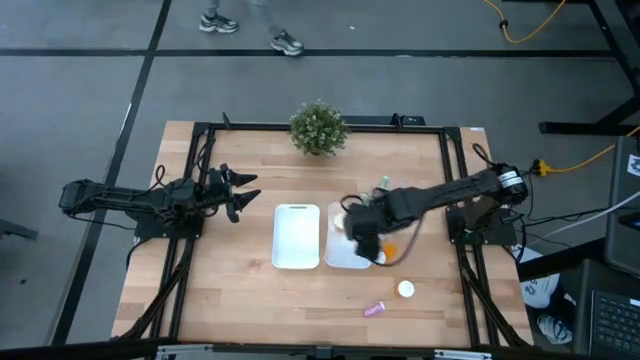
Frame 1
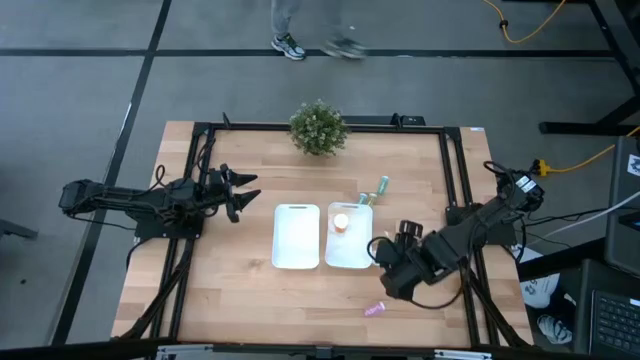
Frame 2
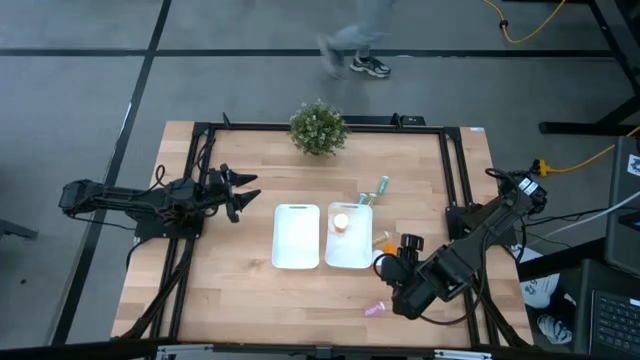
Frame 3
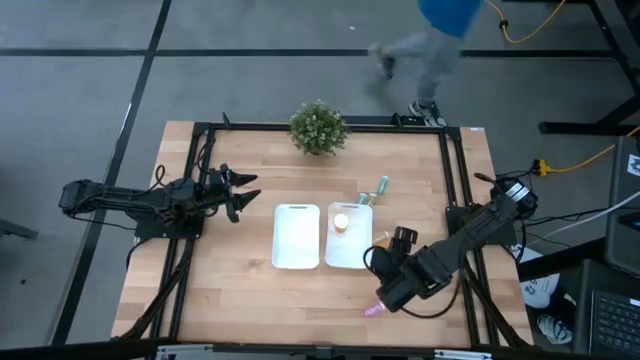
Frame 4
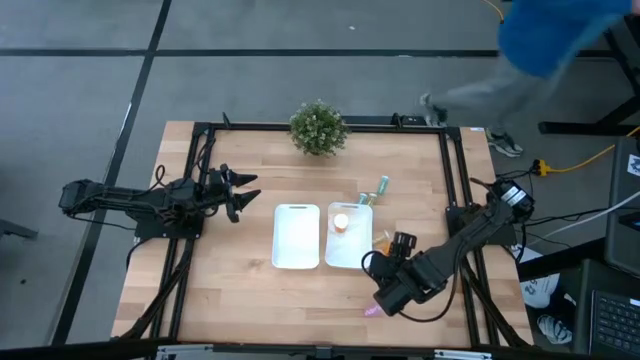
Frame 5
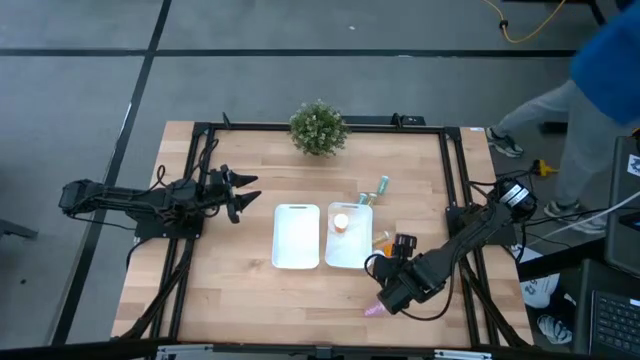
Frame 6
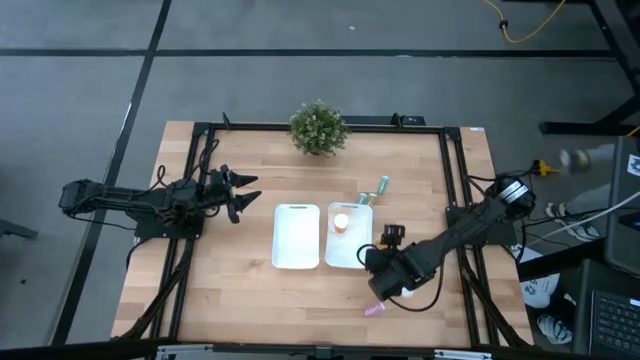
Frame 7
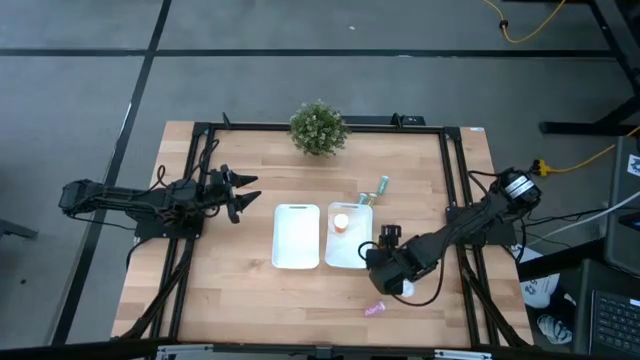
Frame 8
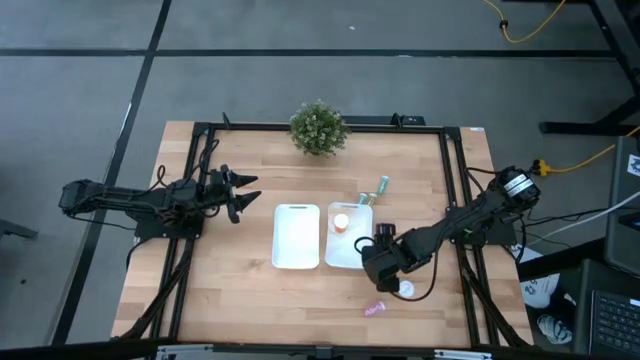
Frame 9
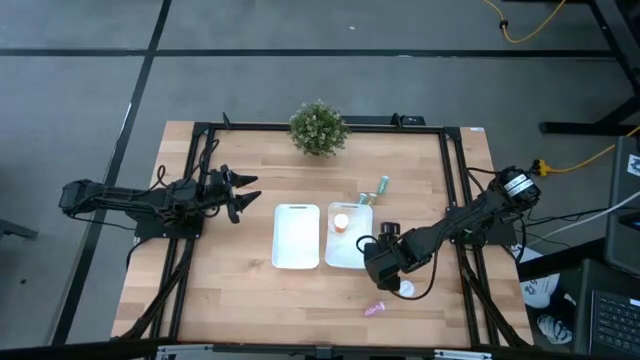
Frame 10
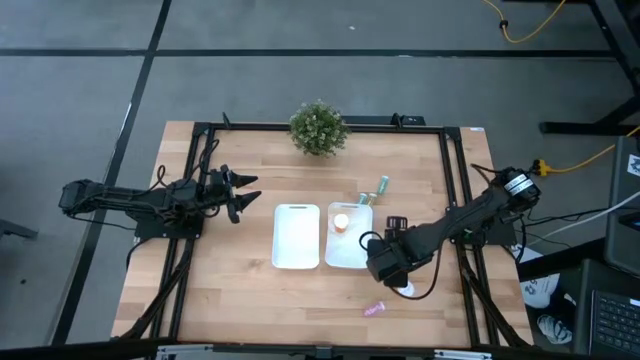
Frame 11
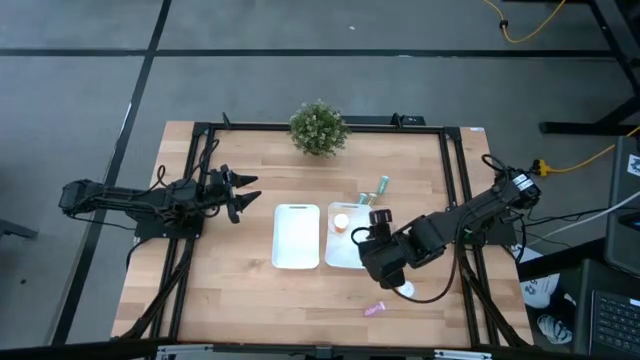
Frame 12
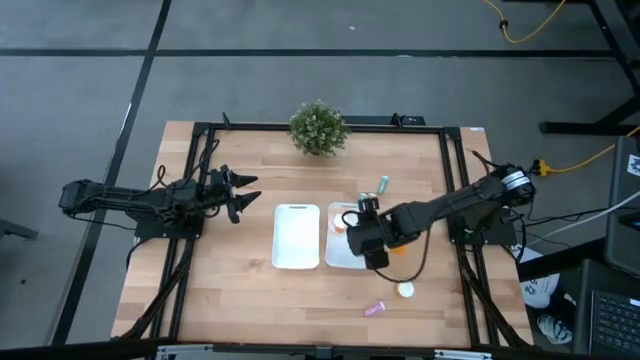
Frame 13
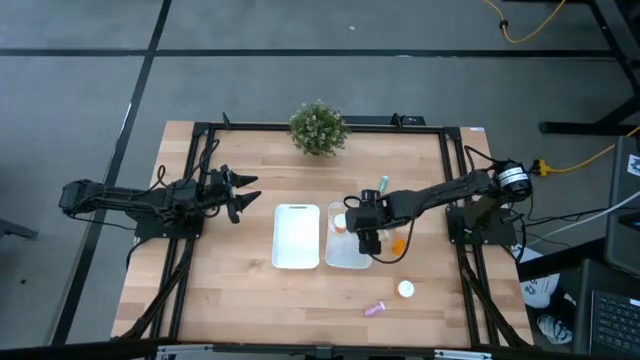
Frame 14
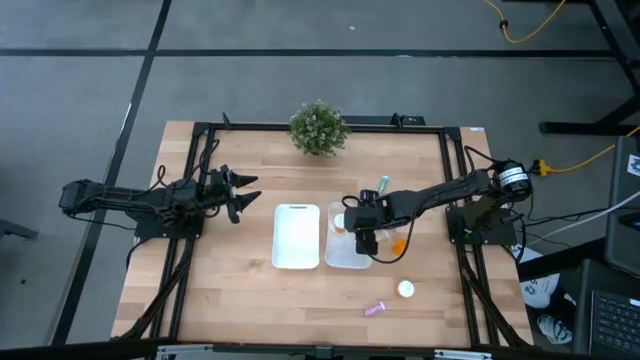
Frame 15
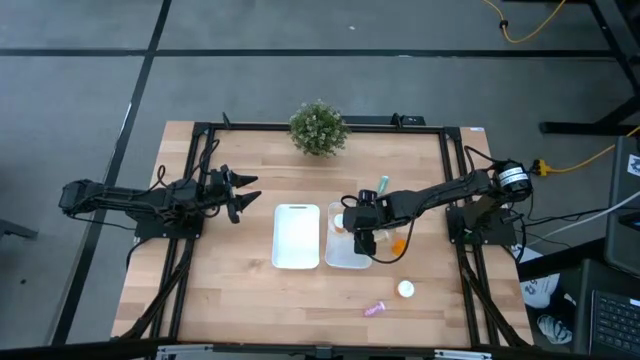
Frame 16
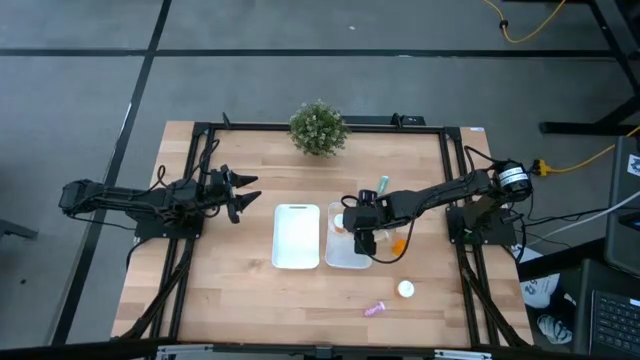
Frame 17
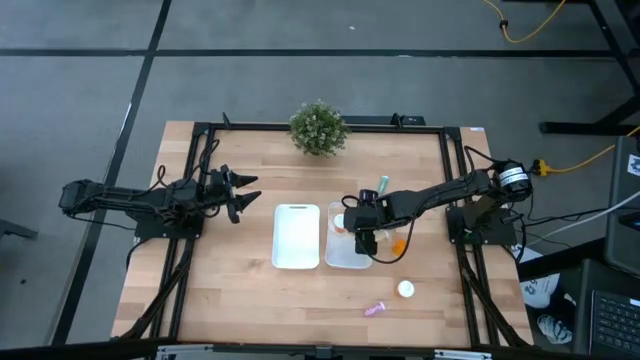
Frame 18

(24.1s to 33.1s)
Task: Pick and place medicine bottles into bin by pill shape (circle, oval)
Put the orange capsule bottle into the right white bin

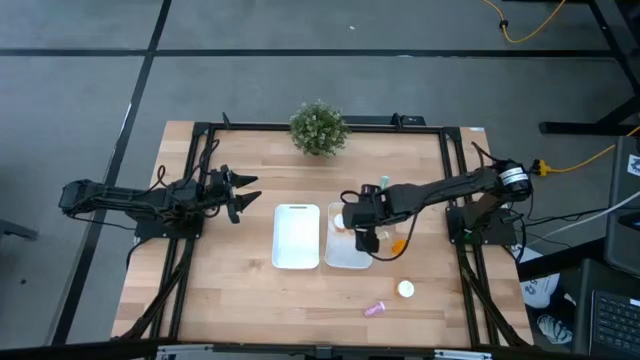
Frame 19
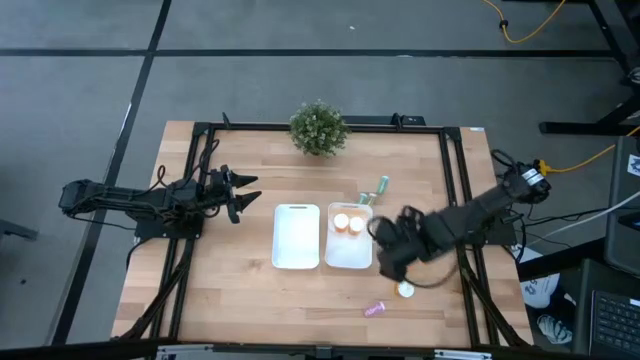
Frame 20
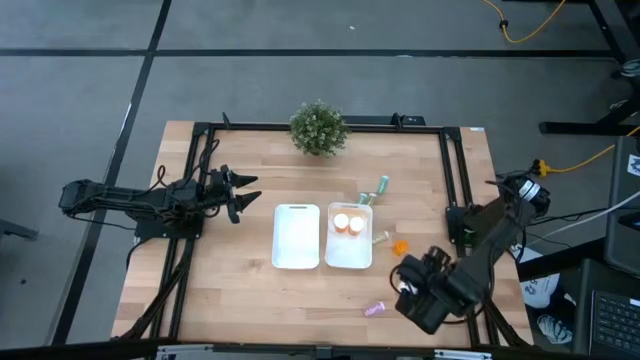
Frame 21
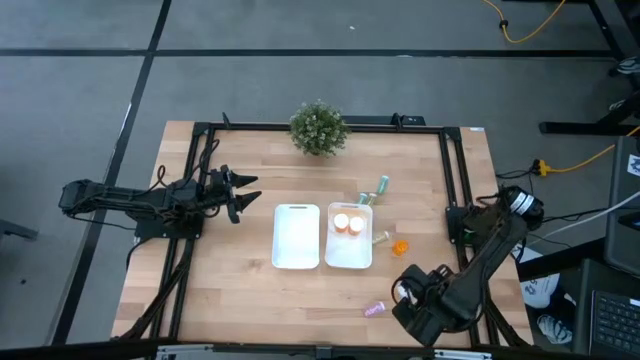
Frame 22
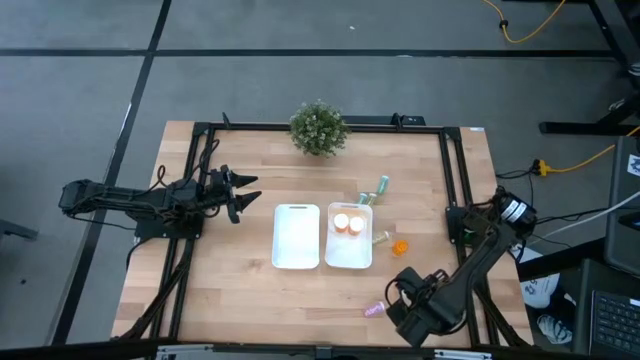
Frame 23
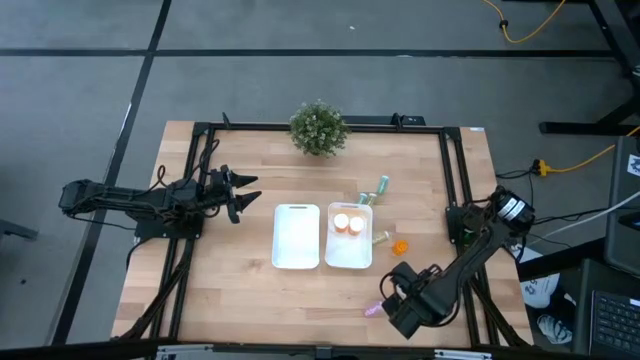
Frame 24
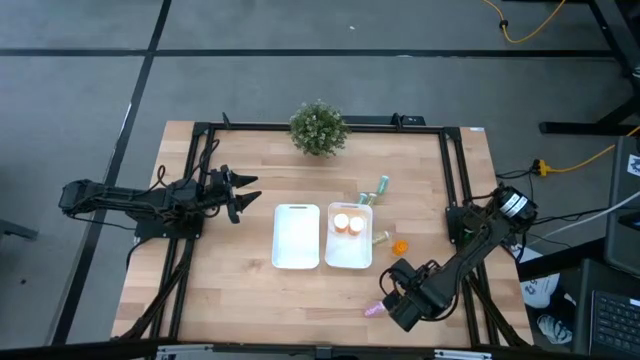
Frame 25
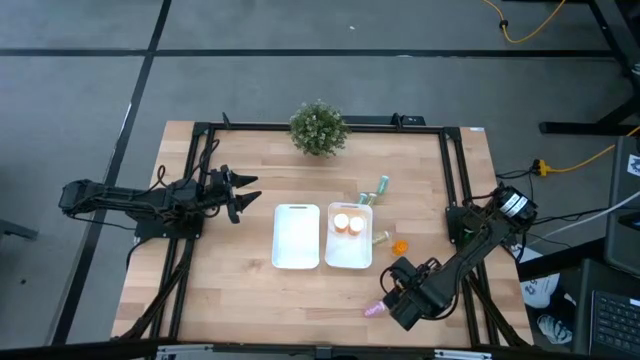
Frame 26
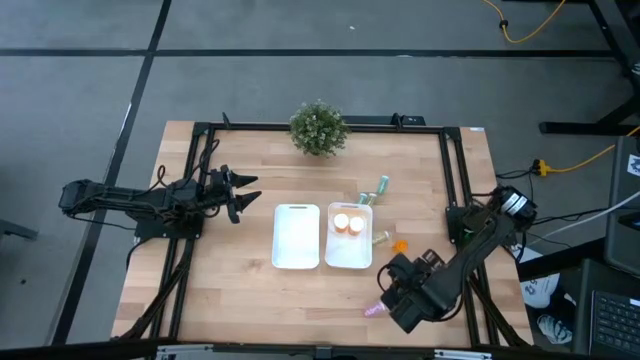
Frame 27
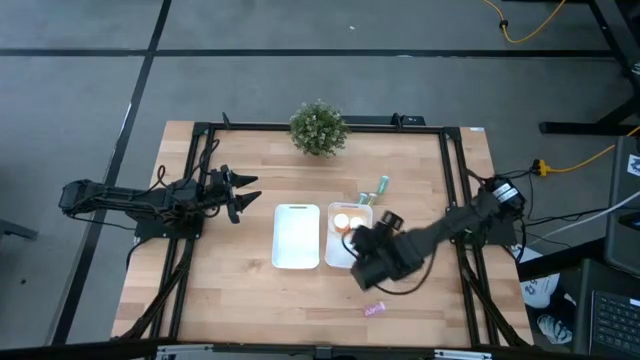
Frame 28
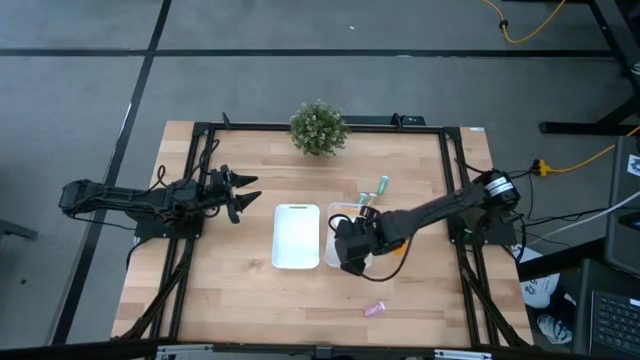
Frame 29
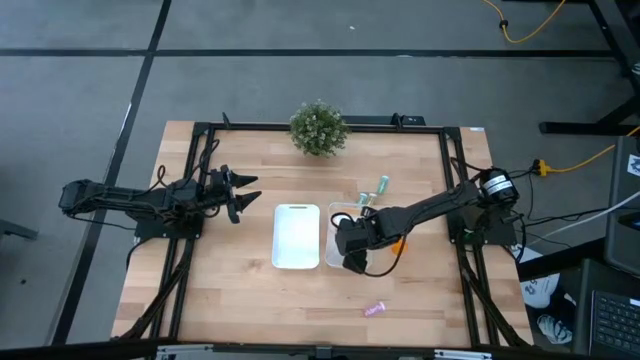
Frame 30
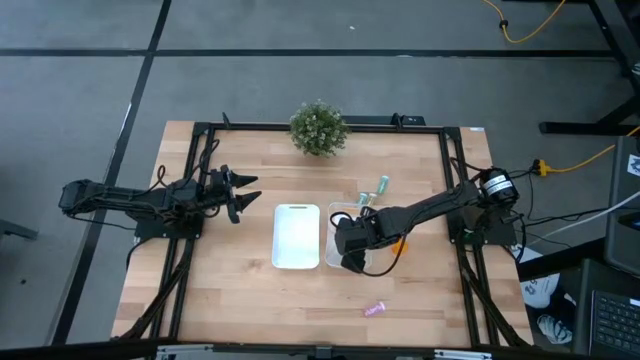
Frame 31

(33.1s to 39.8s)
Put the orange capsule bottle into the right white bin

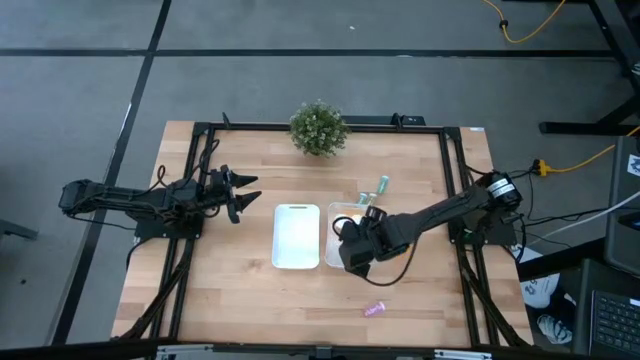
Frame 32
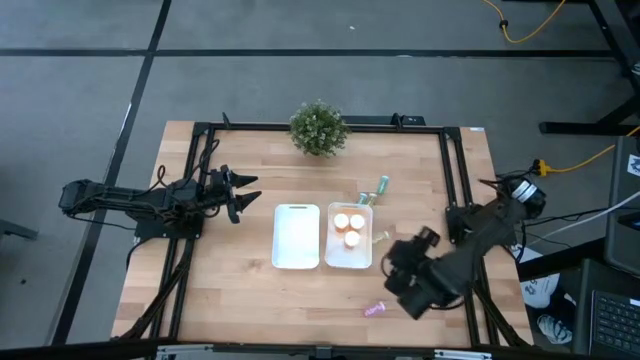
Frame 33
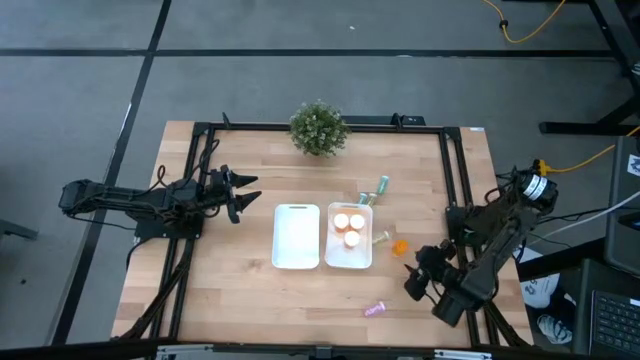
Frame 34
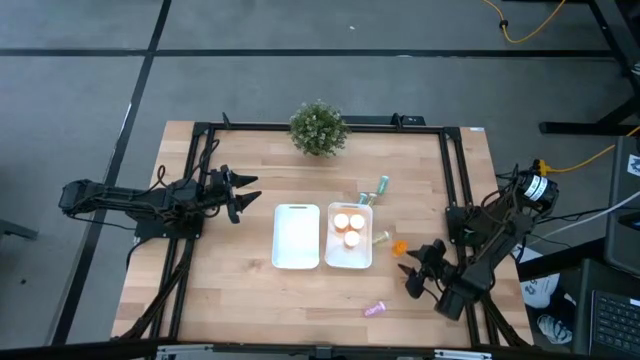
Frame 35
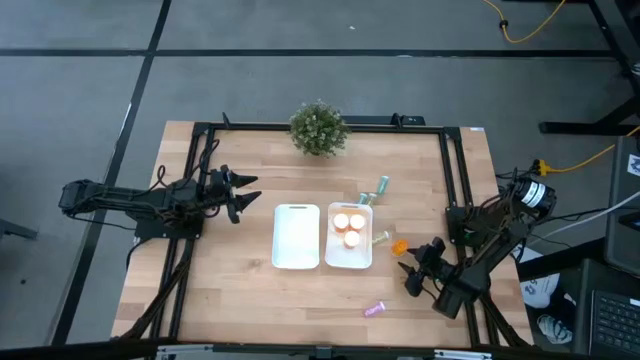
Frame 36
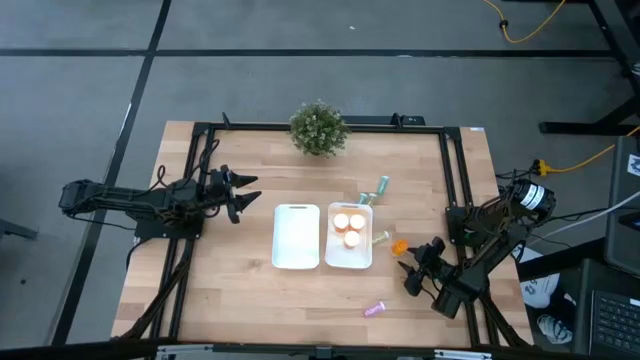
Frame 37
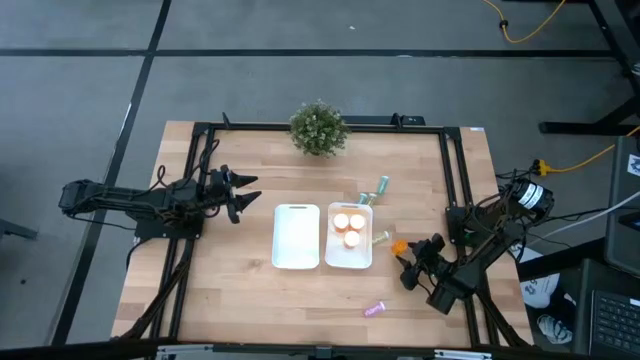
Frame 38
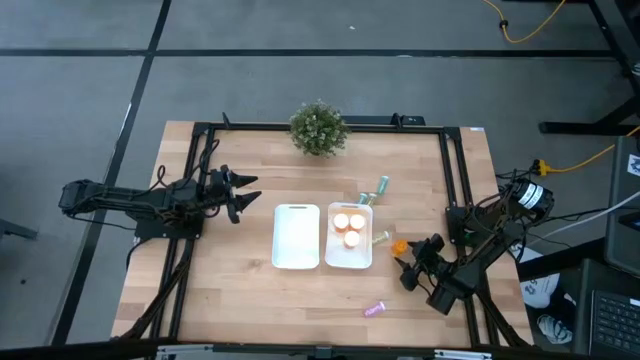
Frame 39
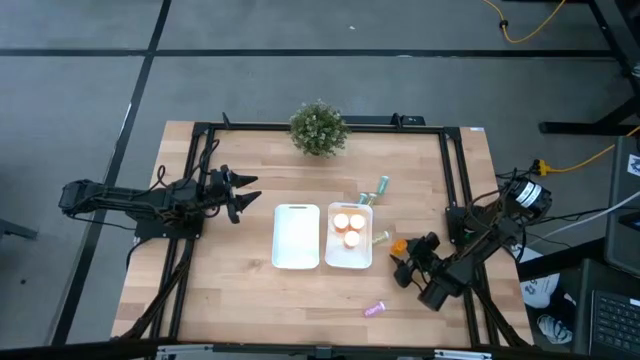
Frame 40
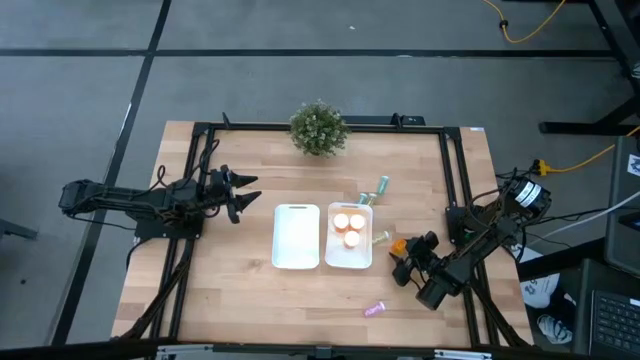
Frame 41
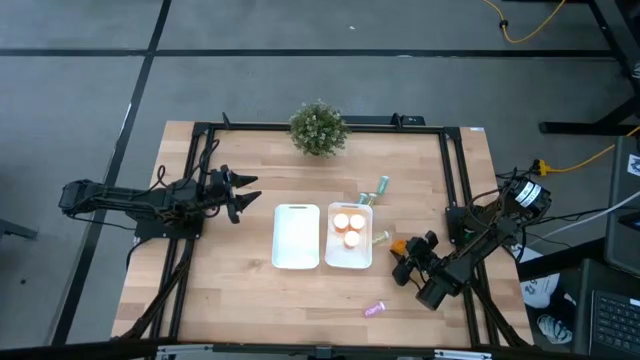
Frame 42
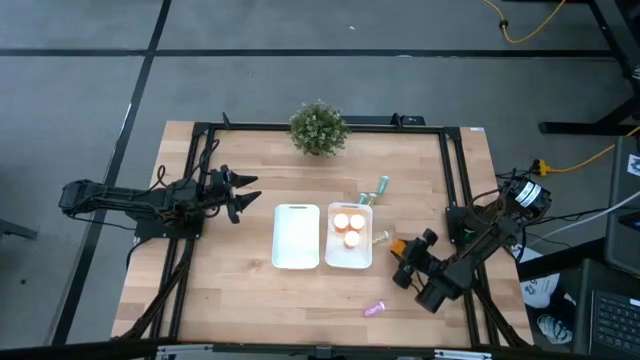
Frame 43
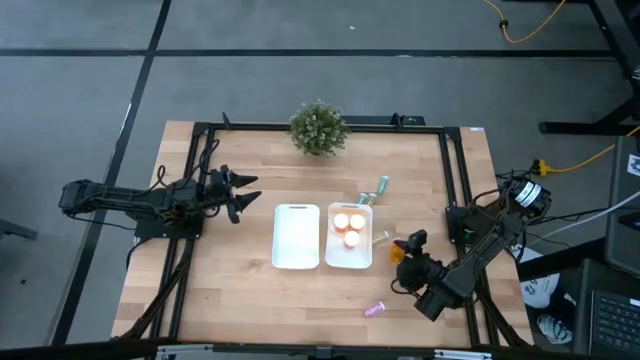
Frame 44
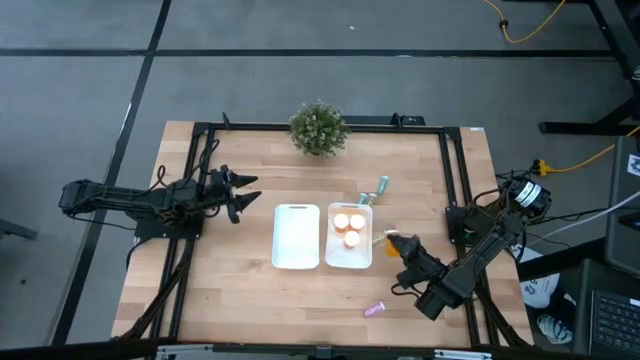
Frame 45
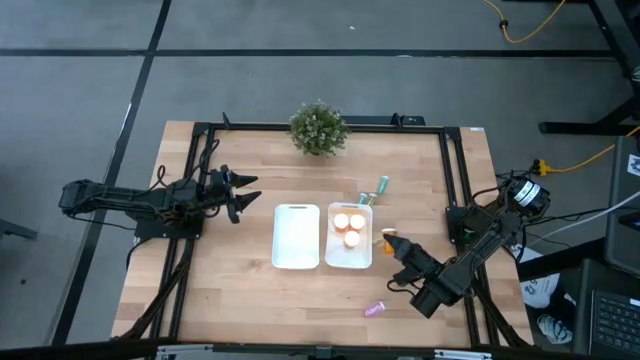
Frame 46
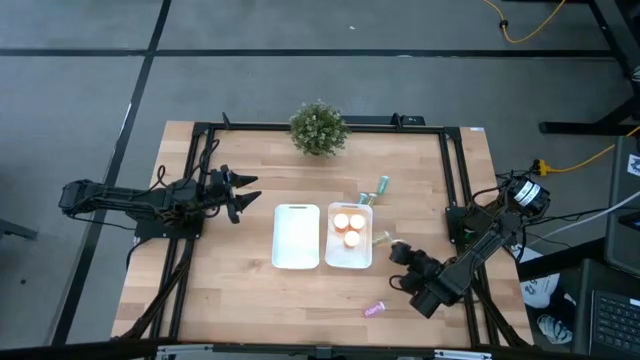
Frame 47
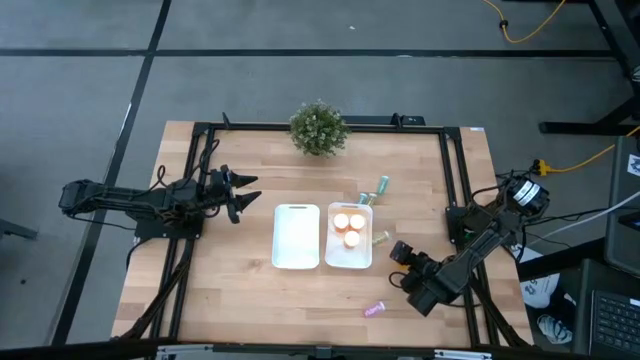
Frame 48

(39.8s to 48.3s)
Put the orange capsule bottle into the right white bin
